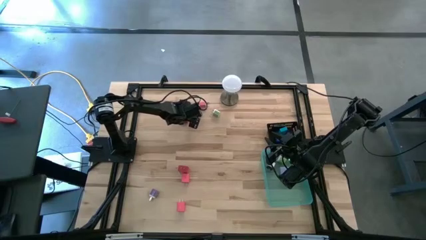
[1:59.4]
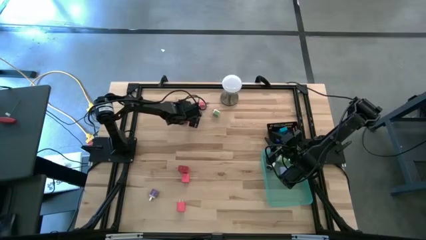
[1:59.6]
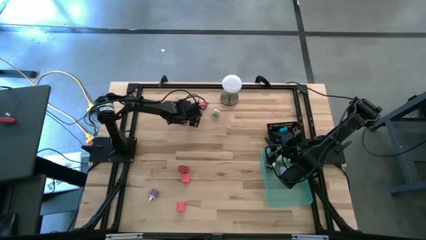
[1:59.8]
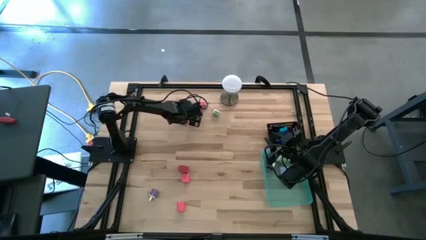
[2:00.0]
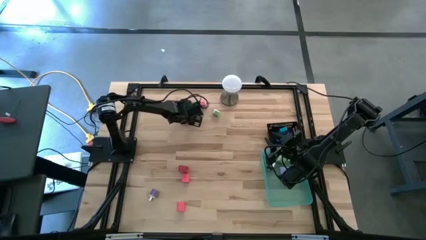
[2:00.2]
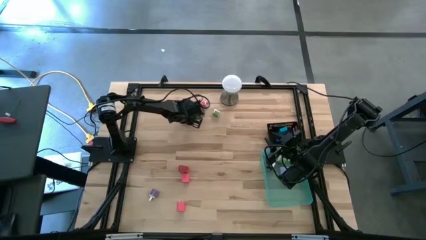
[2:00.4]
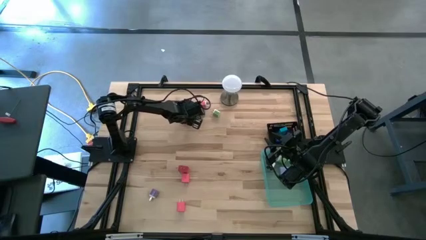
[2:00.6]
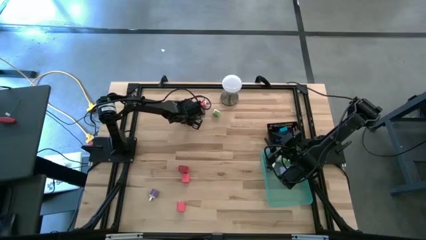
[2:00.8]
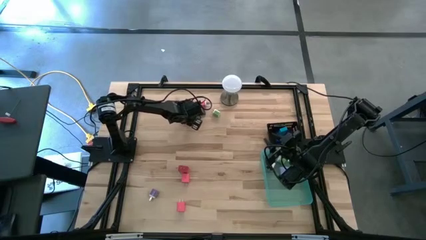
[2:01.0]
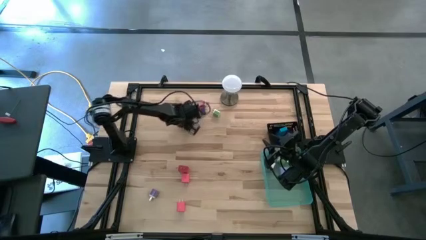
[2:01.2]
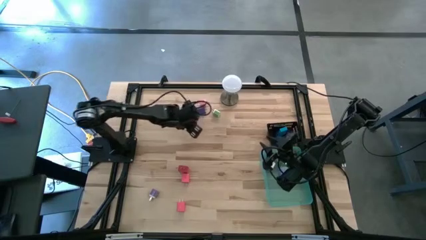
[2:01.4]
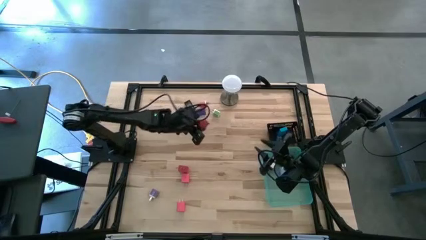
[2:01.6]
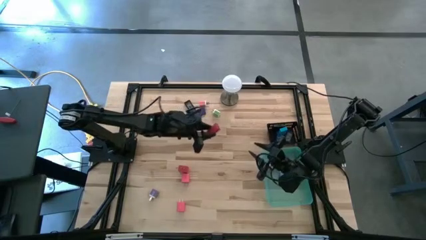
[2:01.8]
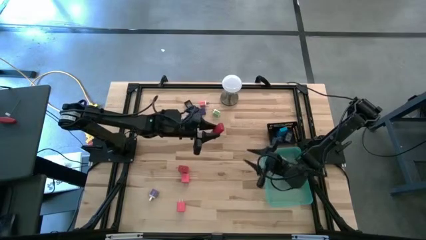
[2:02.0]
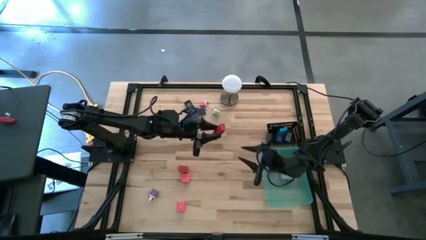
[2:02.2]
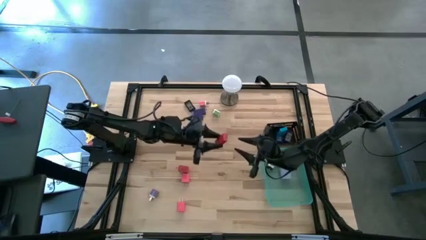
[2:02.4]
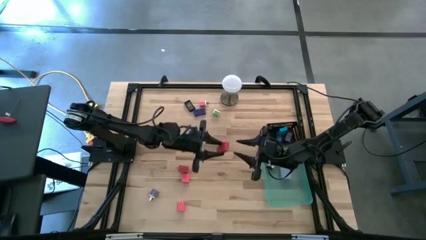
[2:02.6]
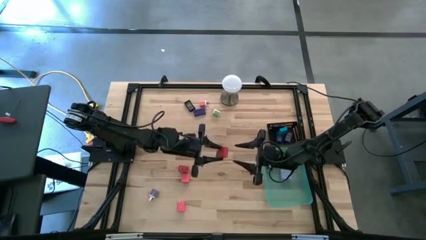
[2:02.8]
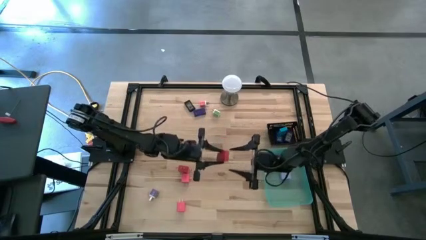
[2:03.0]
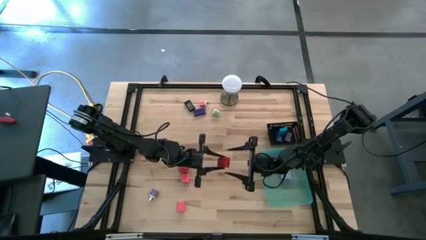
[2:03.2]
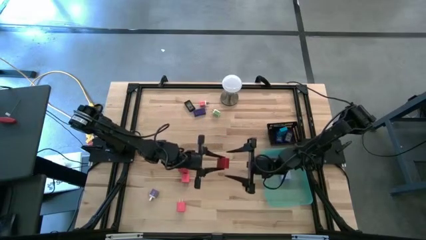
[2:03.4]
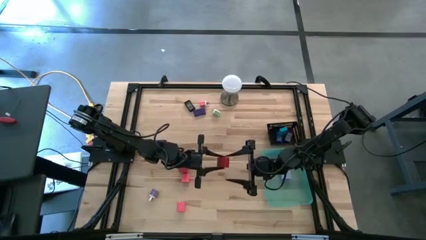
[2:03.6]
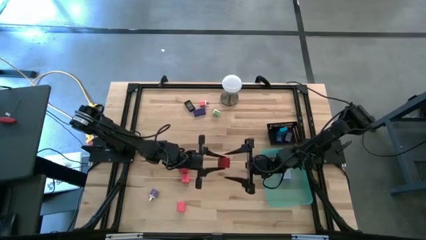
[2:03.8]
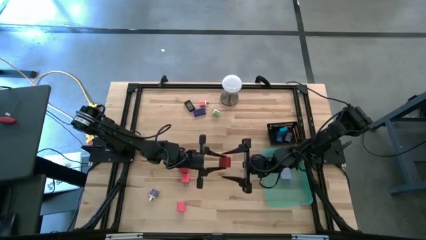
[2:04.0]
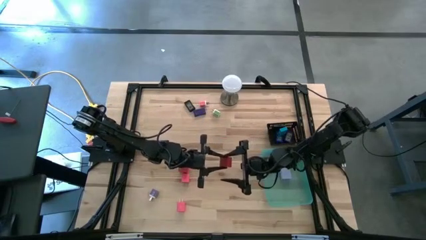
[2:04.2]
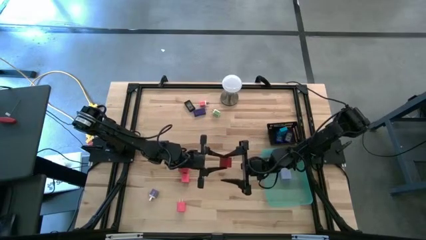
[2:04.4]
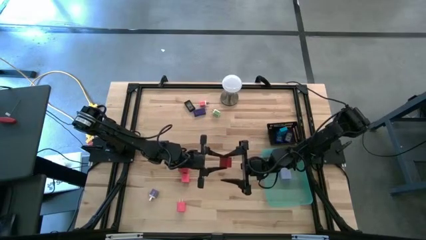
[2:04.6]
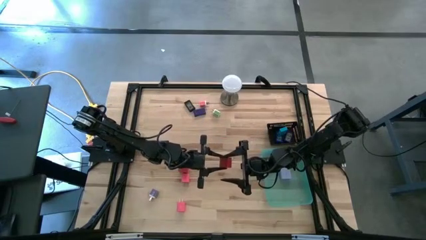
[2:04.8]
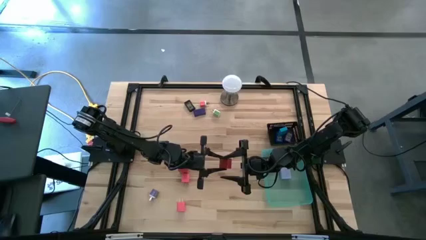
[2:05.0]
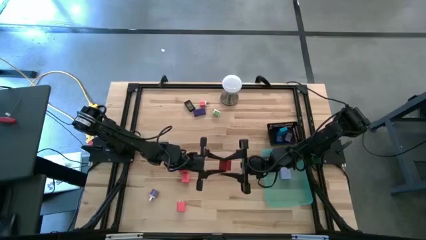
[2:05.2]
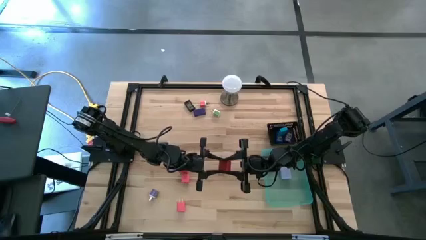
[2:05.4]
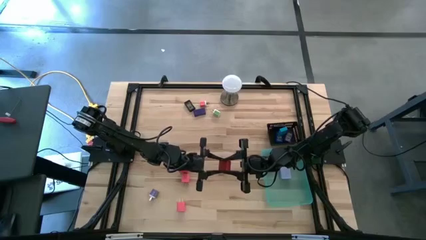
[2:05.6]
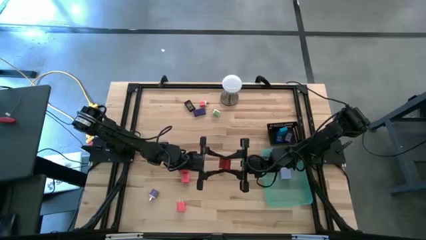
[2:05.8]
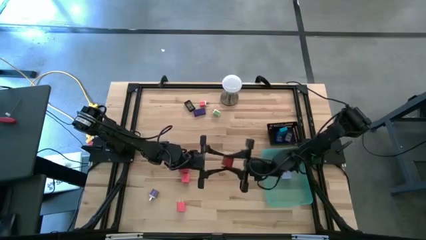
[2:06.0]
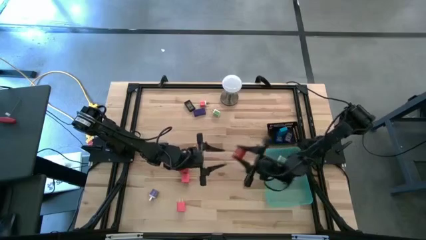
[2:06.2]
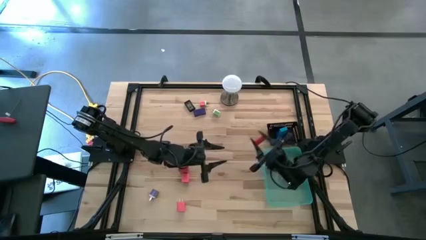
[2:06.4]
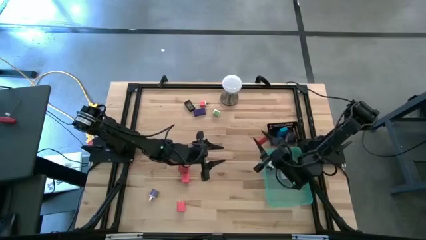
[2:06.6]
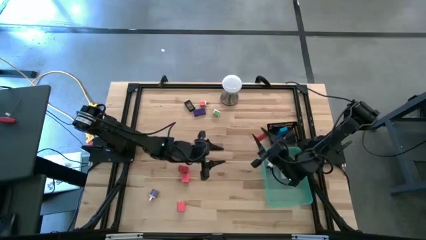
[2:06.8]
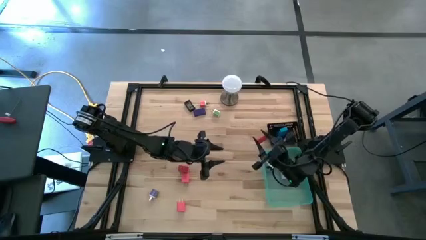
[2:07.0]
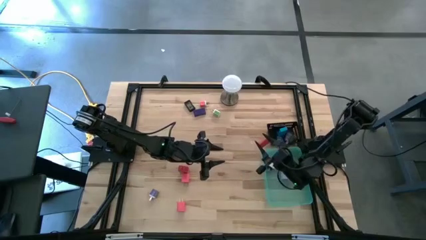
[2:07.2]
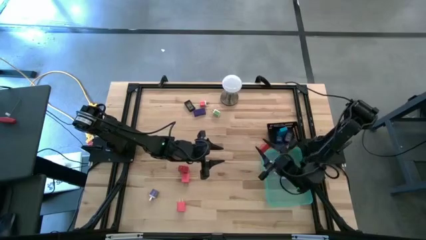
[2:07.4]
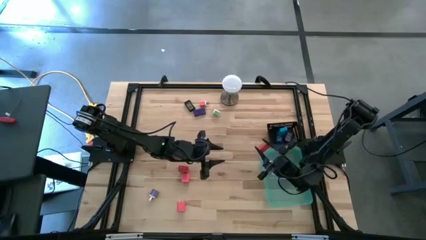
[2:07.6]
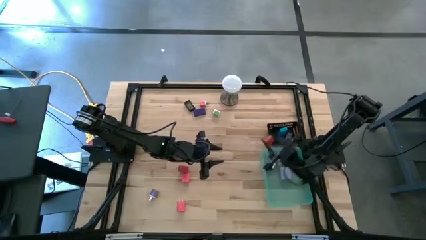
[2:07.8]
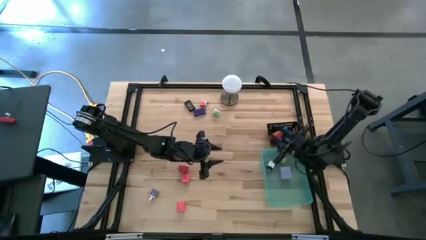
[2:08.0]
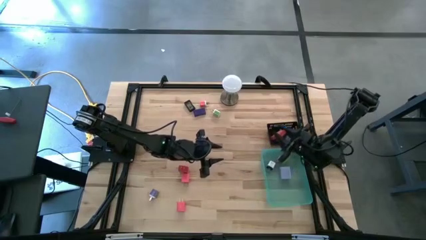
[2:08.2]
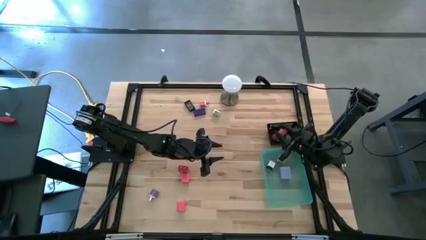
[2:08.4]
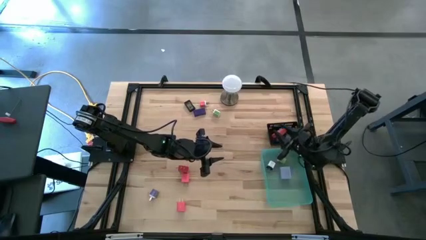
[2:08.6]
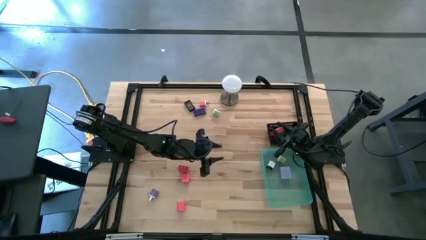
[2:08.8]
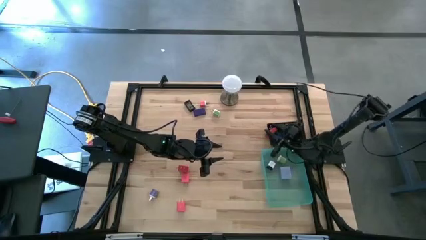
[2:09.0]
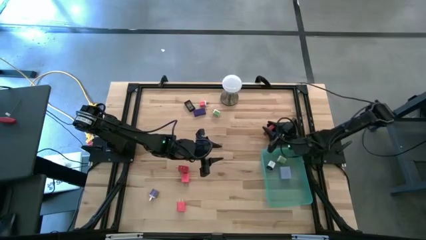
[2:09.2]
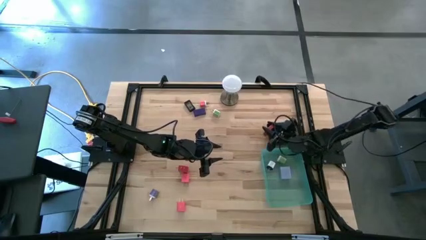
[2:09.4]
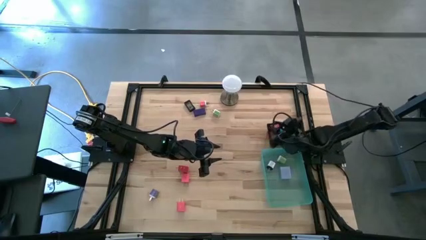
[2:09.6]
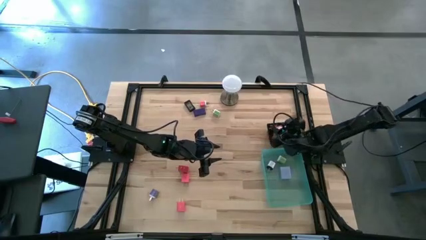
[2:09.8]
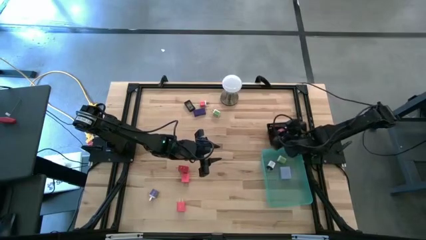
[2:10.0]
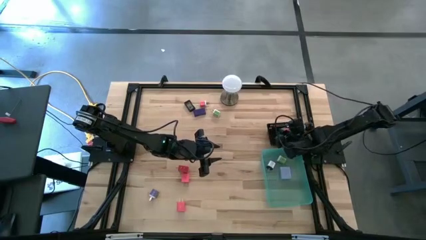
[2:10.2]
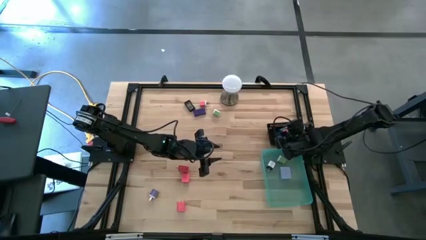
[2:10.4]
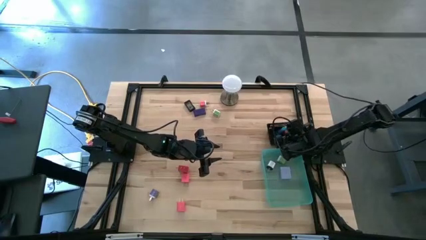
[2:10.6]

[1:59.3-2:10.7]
Task: Pick & Place Office items
Put the red digital clock into the black basket

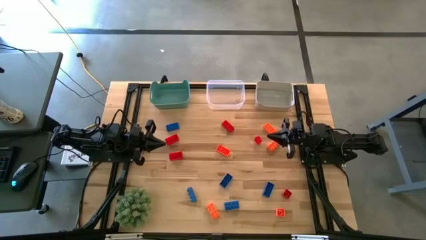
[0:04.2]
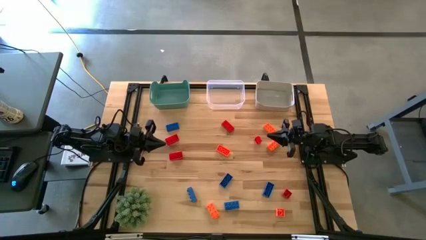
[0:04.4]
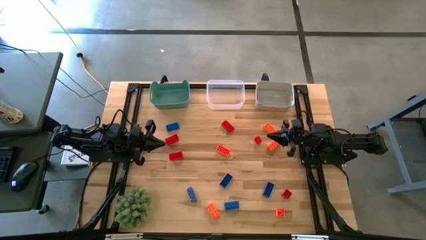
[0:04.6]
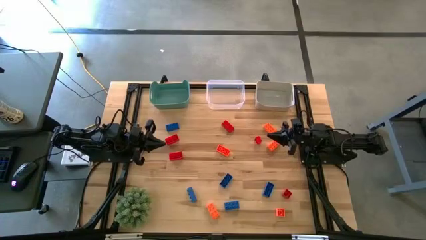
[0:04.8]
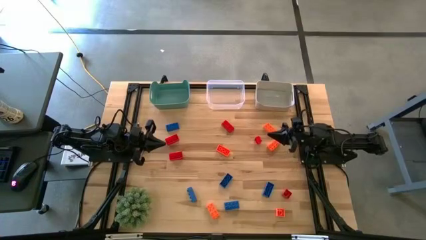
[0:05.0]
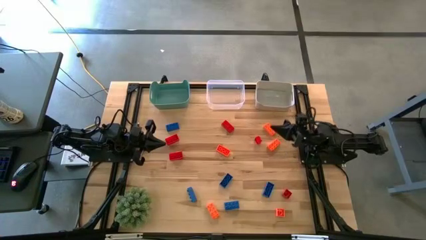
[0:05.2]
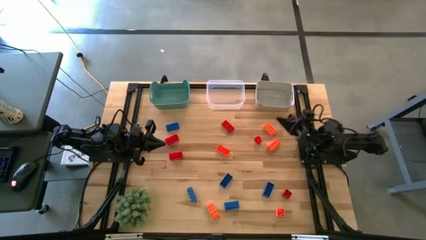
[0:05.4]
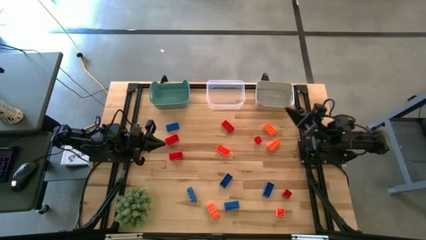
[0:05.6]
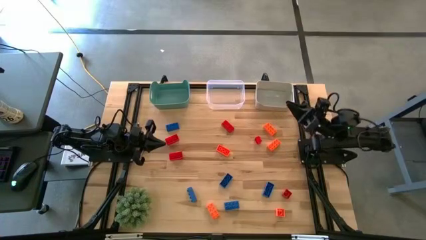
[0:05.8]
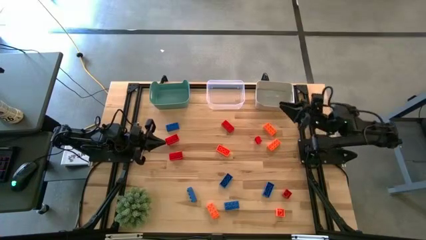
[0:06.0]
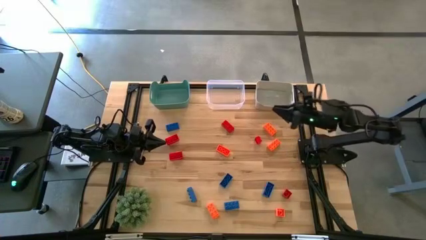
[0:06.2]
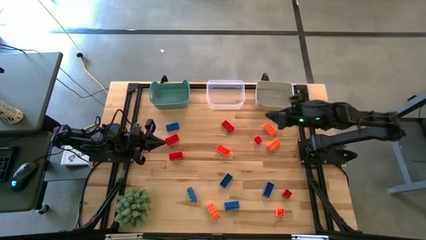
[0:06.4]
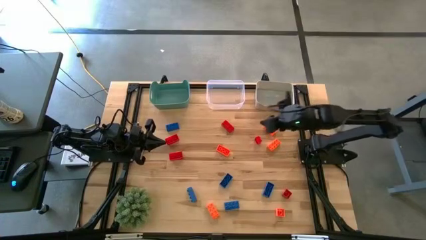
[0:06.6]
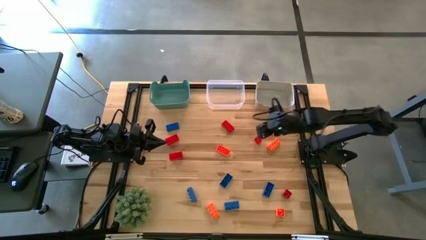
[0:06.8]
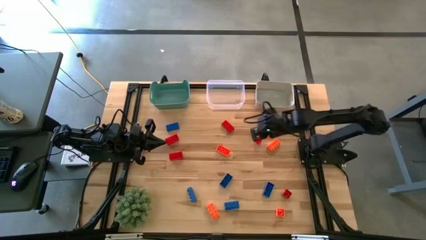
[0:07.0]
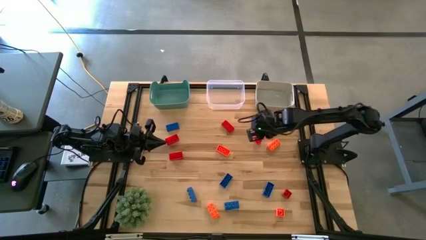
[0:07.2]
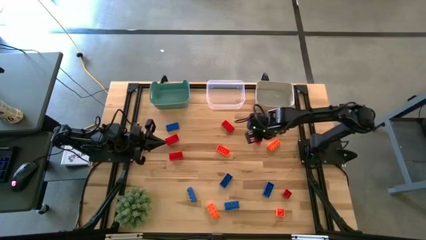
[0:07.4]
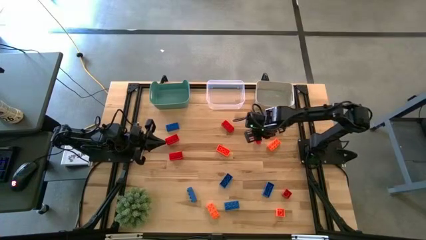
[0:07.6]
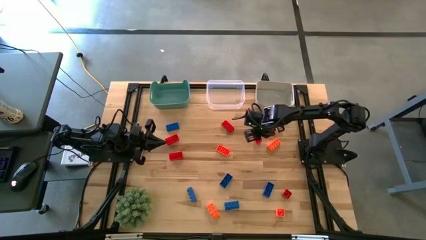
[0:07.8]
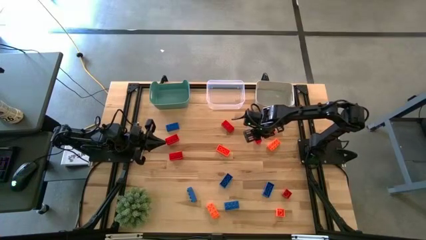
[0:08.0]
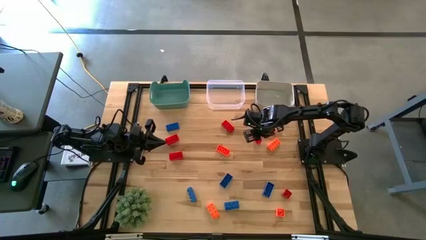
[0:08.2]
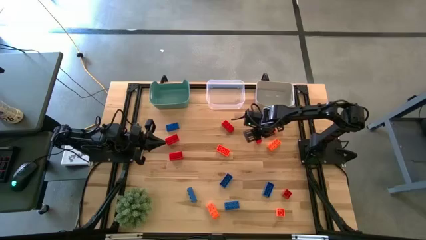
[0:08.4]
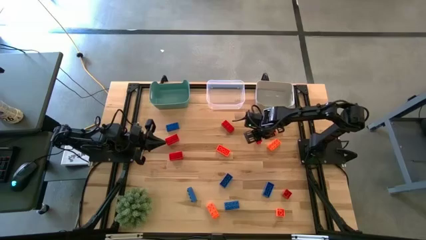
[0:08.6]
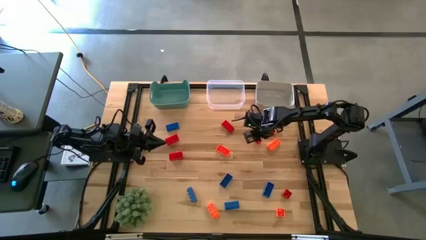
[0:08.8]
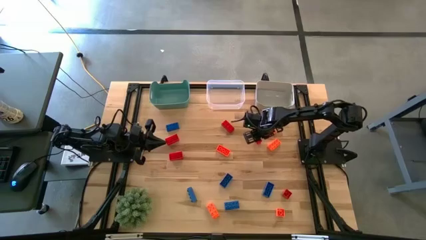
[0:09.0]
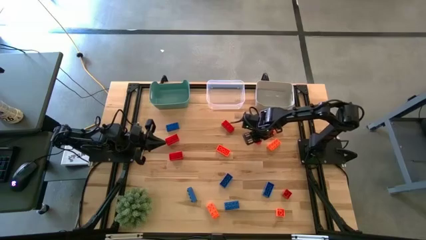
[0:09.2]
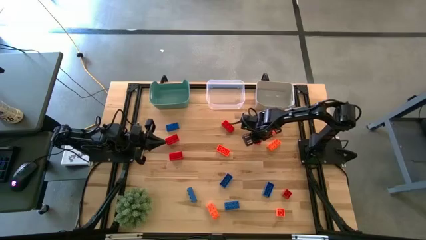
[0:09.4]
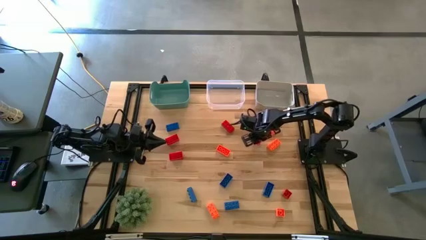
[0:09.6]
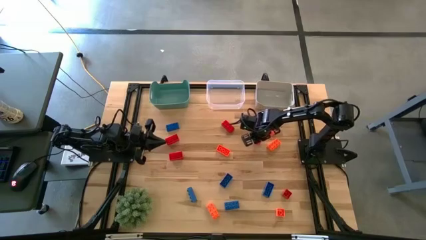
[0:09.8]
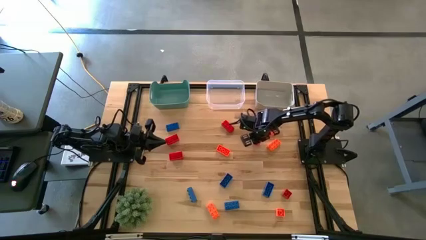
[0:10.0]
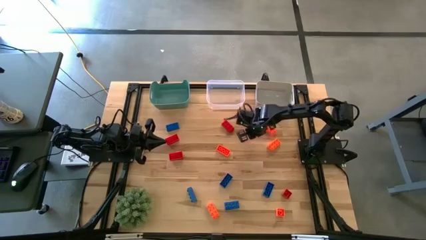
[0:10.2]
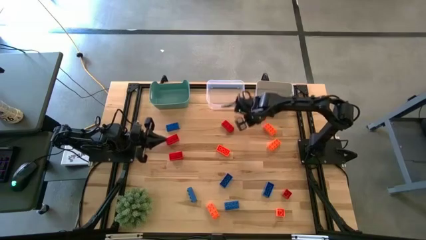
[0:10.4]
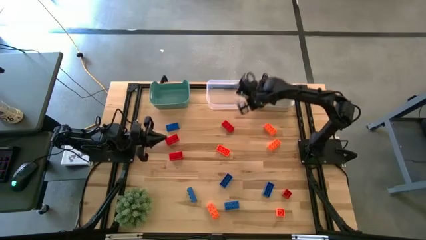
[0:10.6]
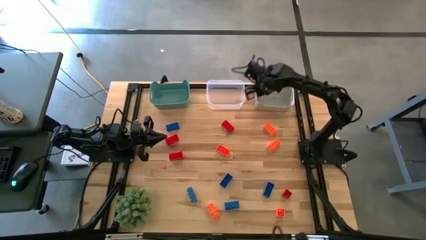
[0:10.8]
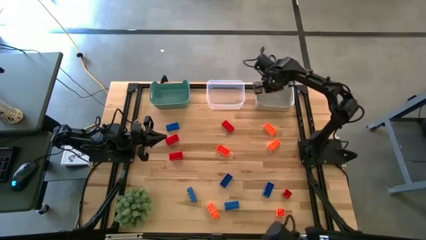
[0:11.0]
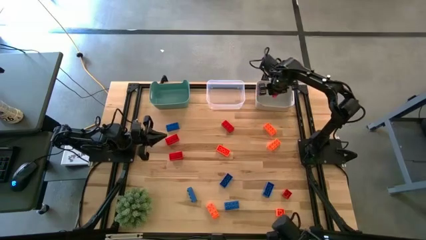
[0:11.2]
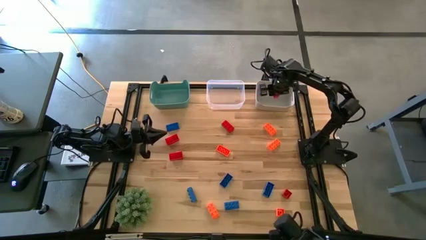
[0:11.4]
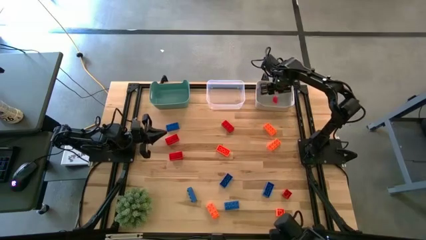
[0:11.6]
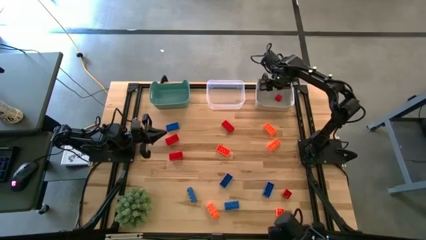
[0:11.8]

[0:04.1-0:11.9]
Task: Sort & place blocks by color
Put the red game piece into the gray bin
